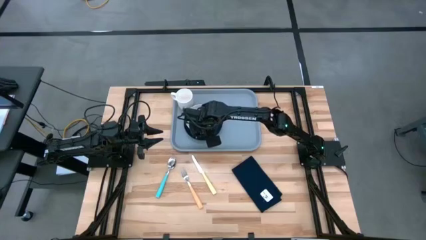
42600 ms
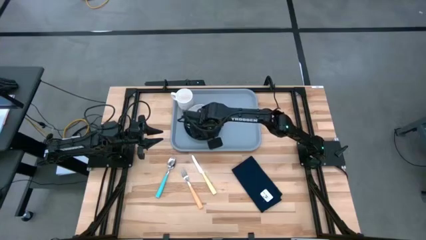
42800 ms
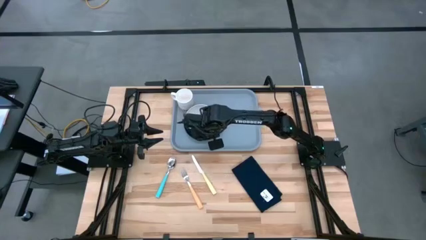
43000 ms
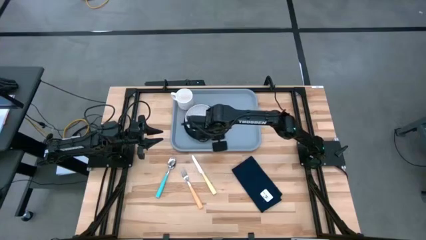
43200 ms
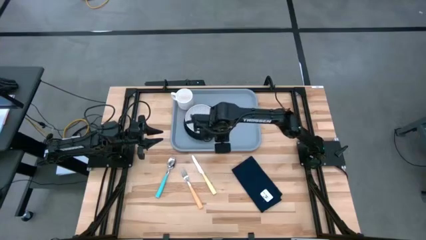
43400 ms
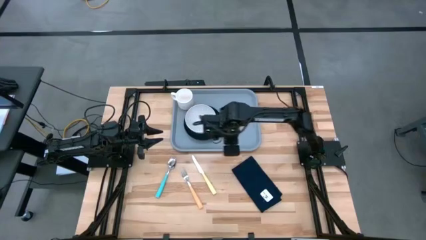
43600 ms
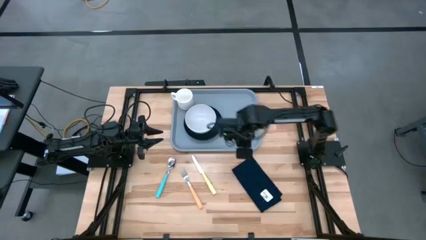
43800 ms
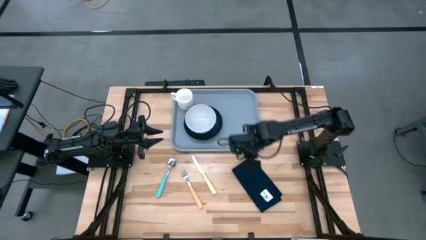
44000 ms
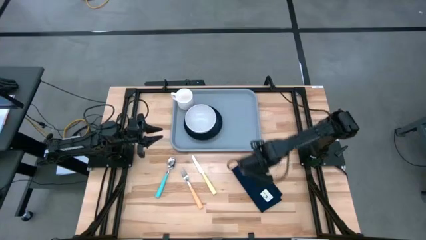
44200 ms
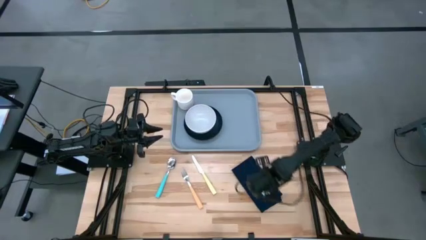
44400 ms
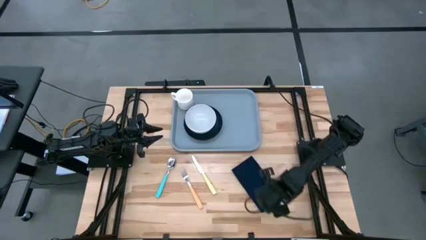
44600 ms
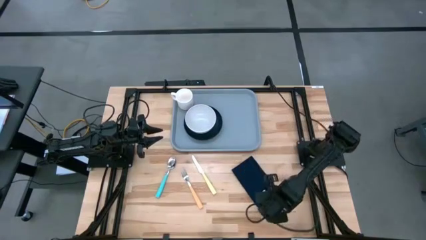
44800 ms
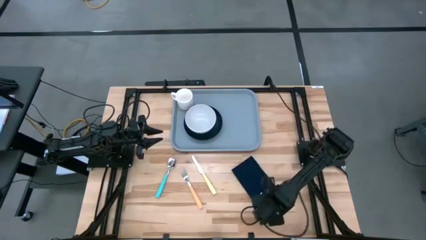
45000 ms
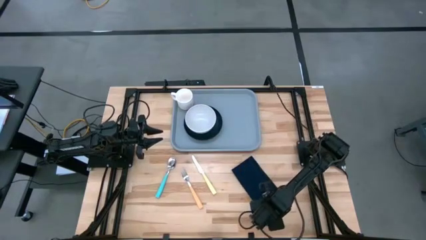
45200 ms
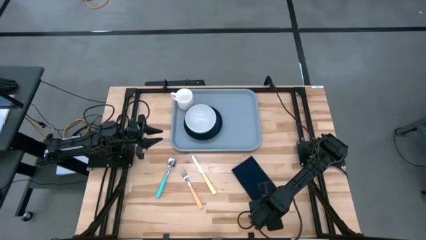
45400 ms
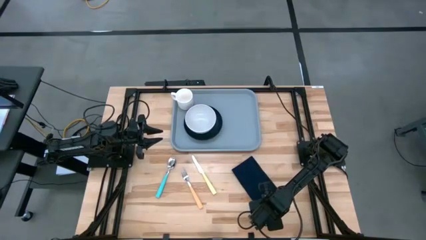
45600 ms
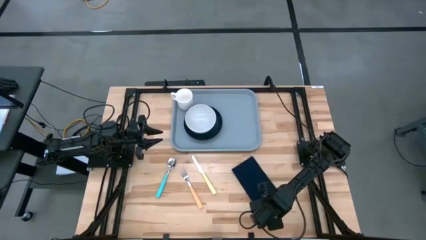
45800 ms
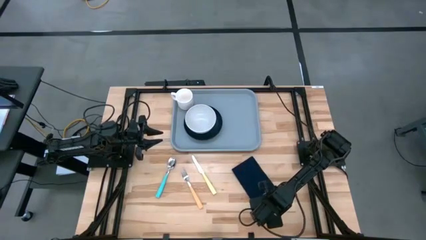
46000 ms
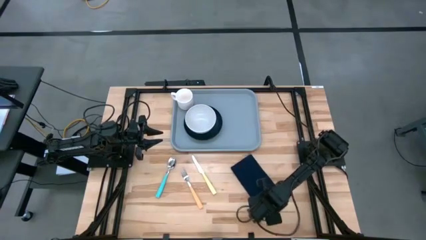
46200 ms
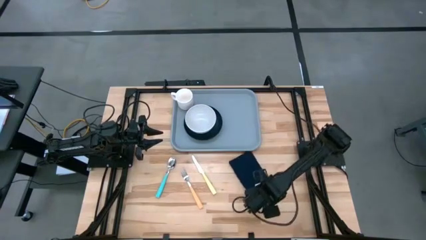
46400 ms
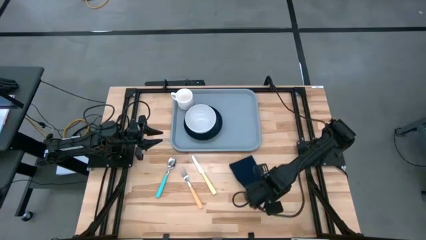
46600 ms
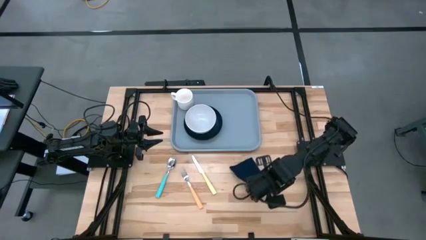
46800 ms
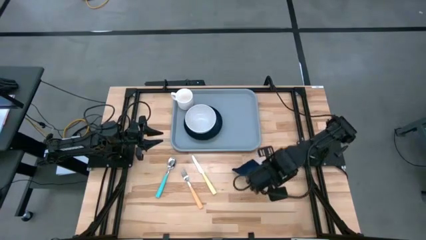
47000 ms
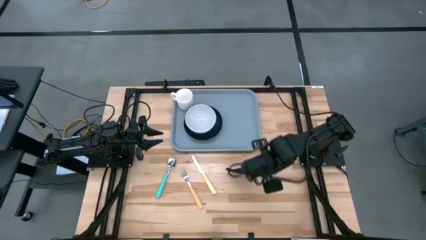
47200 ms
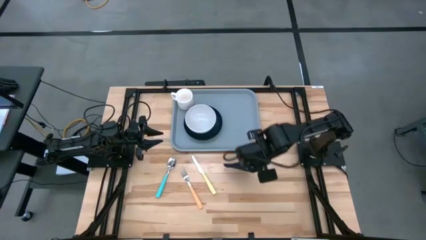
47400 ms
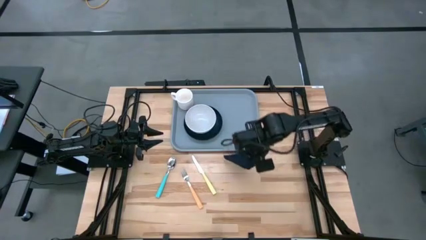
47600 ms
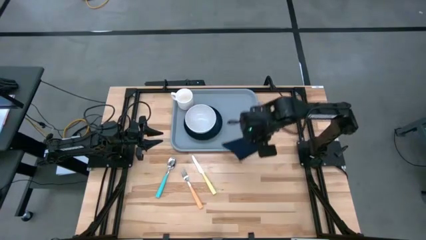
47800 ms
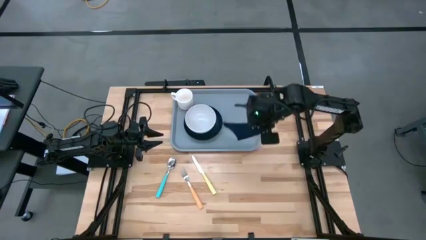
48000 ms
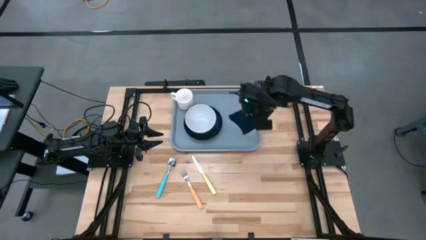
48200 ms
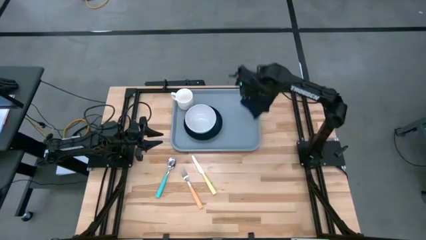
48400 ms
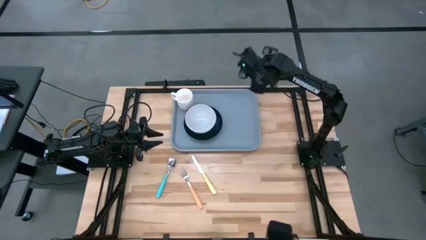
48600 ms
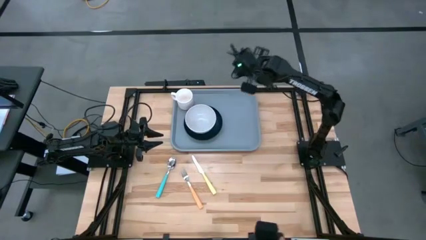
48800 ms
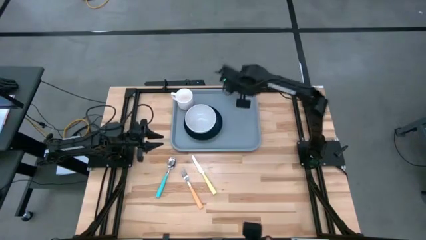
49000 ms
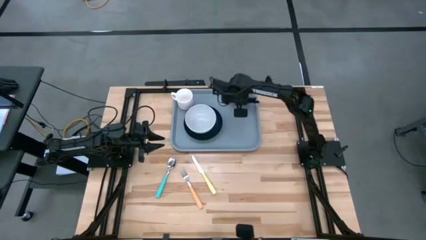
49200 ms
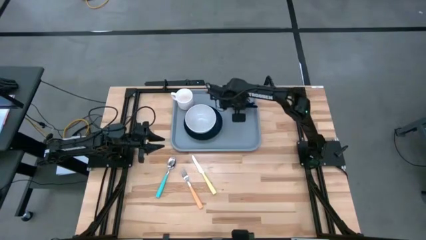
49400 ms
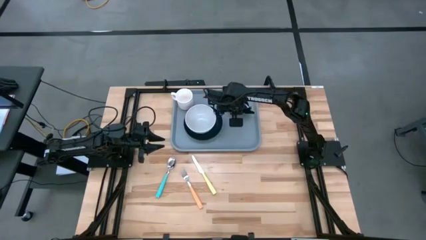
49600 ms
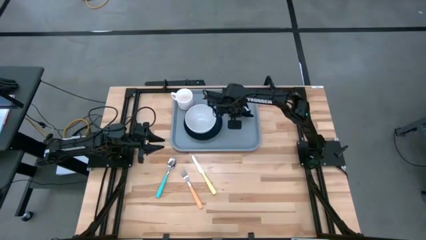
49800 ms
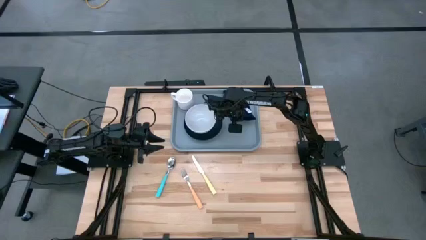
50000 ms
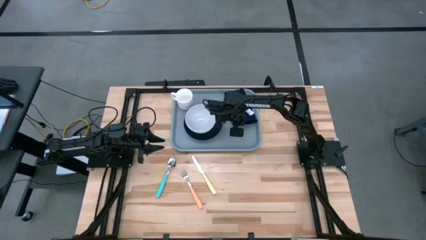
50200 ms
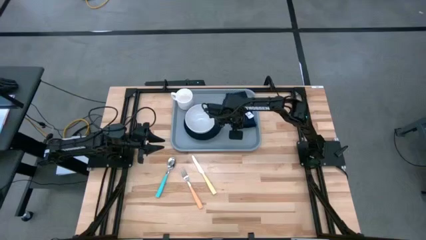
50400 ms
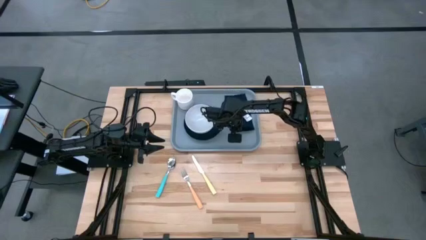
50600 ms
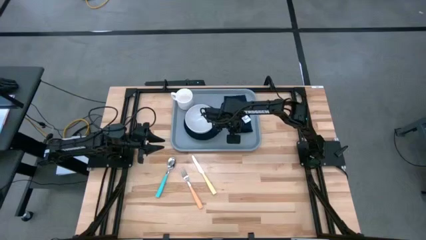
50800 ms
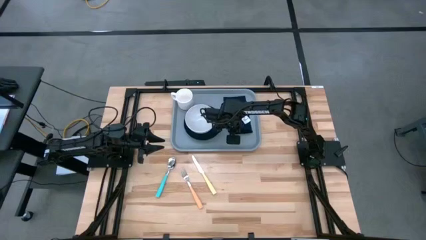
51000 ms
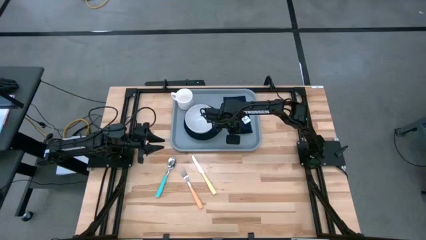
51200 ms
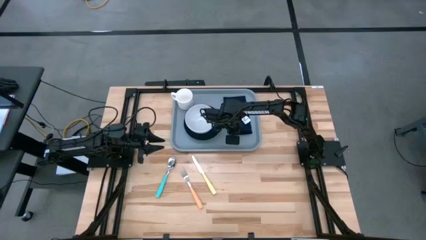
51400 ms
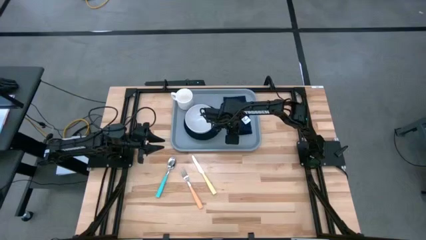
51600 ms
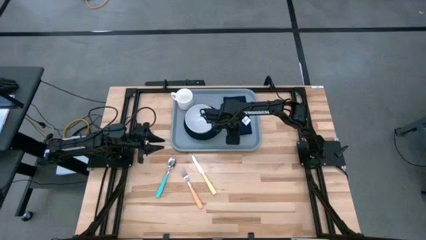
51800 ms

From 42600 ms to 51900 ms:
Task: Set up tray
Put the black napkin to the right of the black plate on the gray serving tray

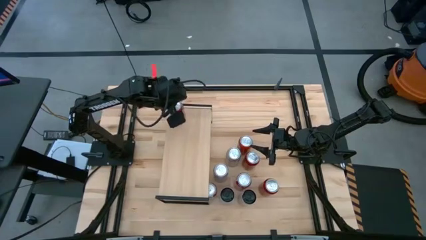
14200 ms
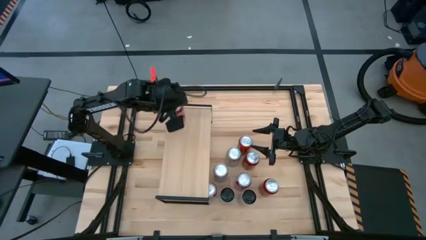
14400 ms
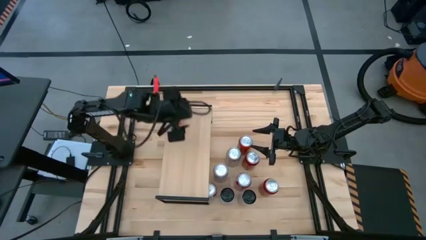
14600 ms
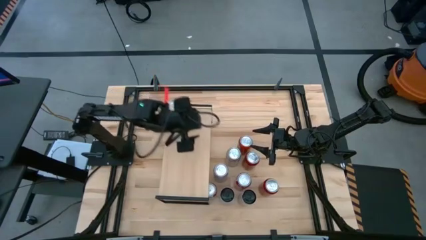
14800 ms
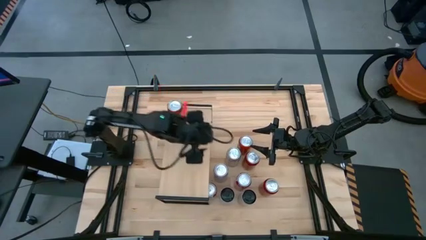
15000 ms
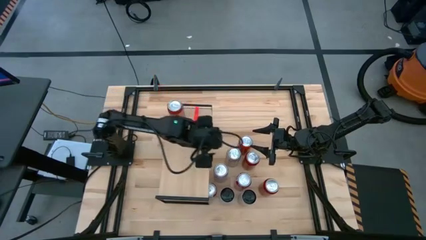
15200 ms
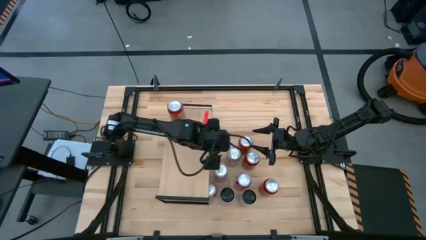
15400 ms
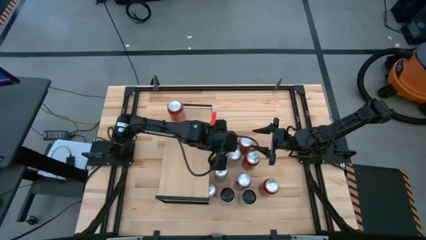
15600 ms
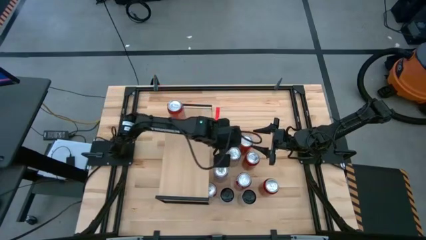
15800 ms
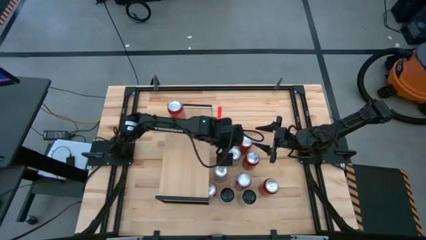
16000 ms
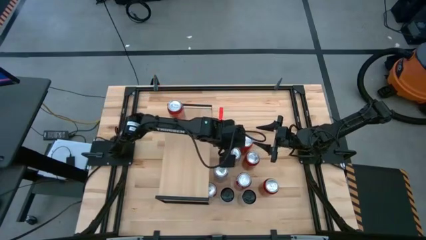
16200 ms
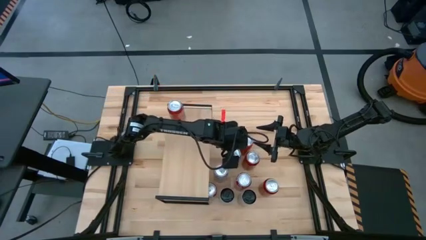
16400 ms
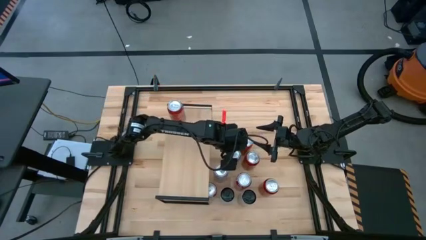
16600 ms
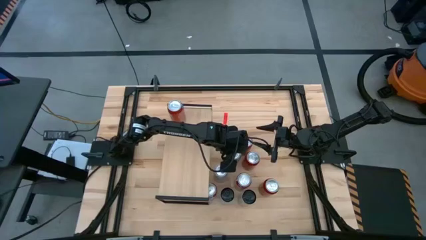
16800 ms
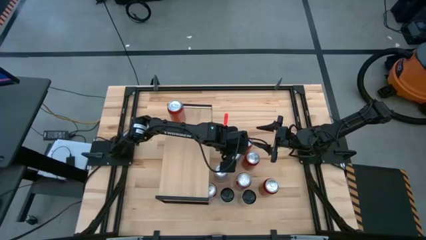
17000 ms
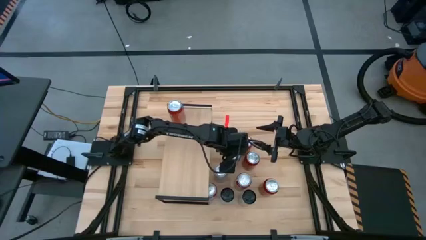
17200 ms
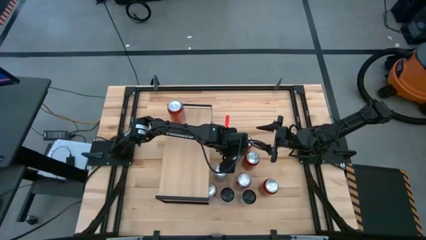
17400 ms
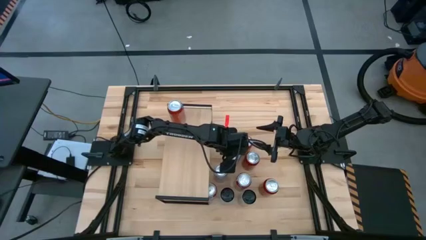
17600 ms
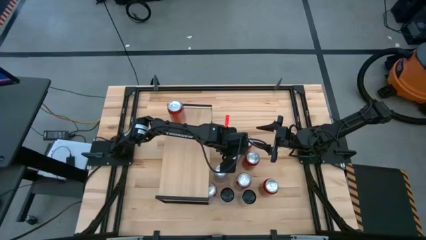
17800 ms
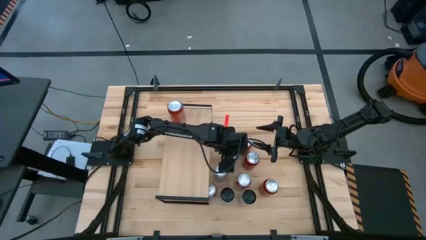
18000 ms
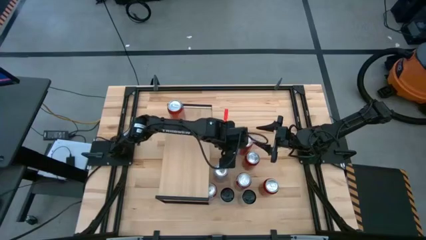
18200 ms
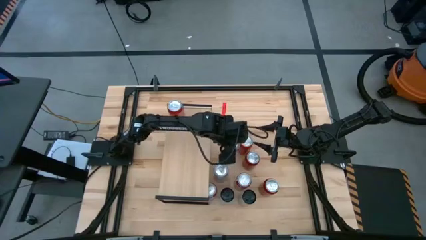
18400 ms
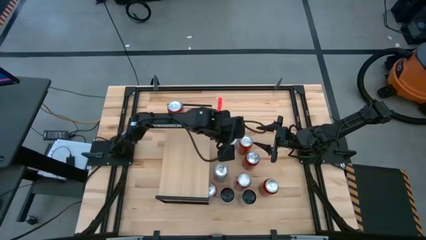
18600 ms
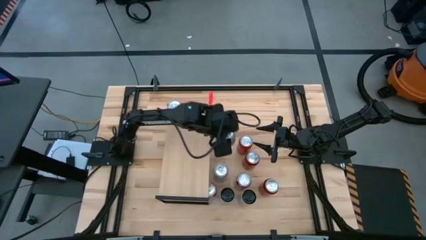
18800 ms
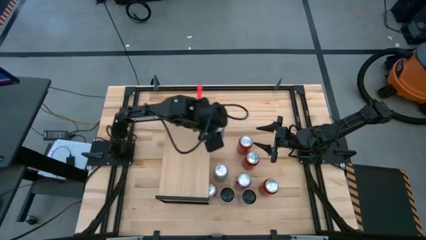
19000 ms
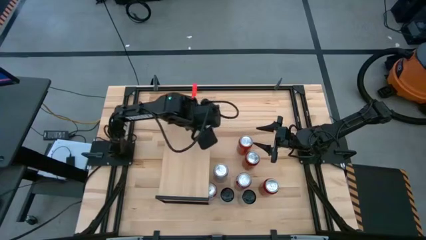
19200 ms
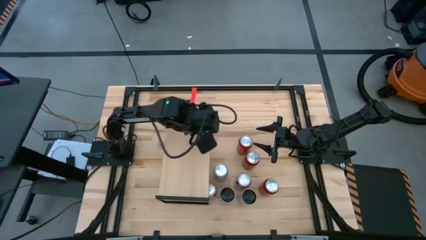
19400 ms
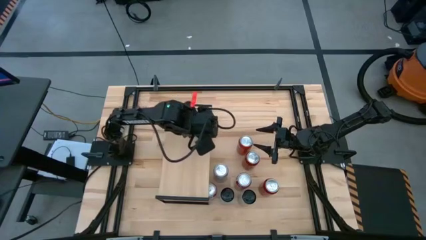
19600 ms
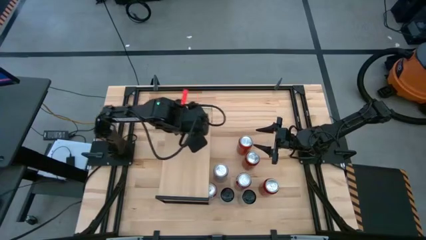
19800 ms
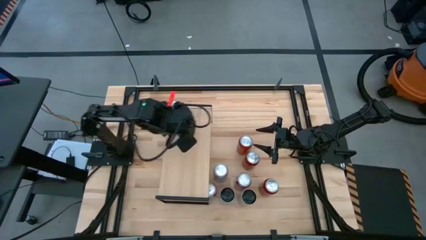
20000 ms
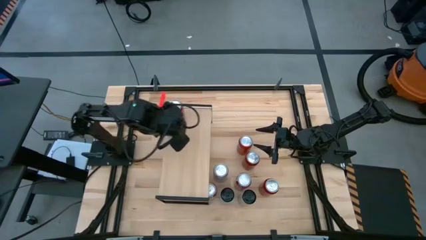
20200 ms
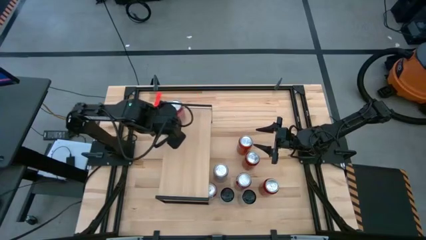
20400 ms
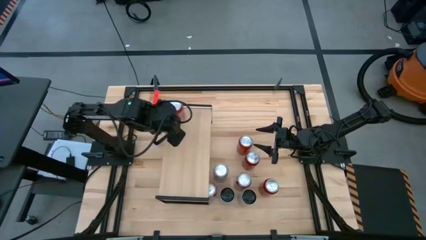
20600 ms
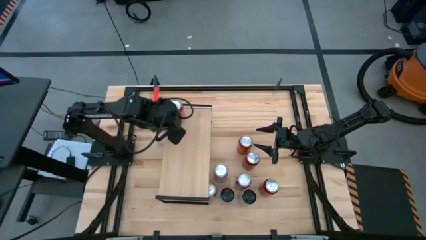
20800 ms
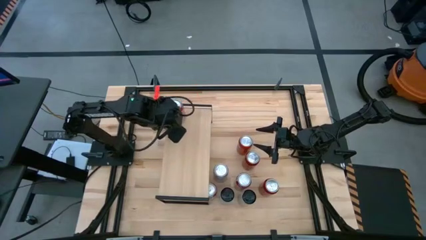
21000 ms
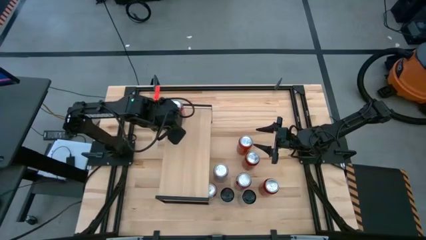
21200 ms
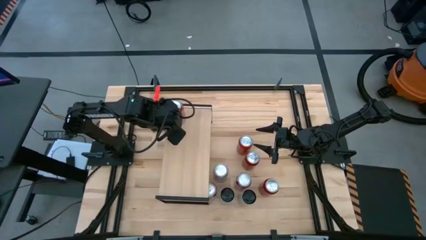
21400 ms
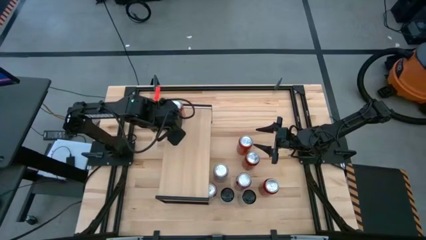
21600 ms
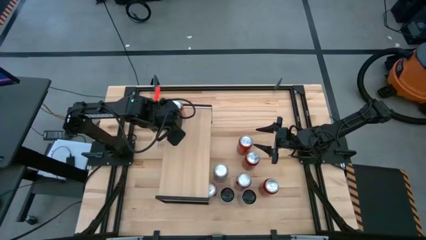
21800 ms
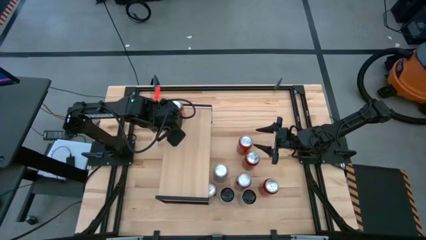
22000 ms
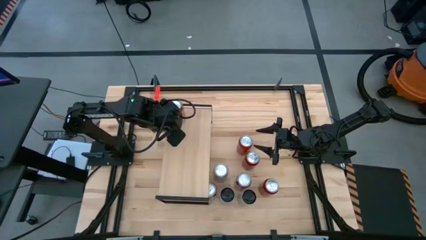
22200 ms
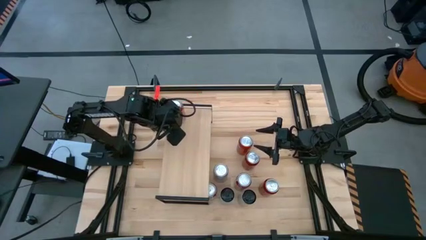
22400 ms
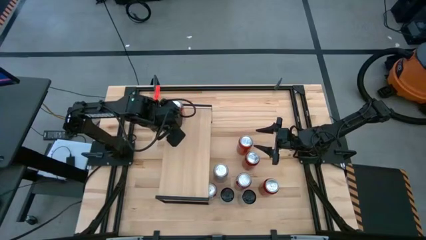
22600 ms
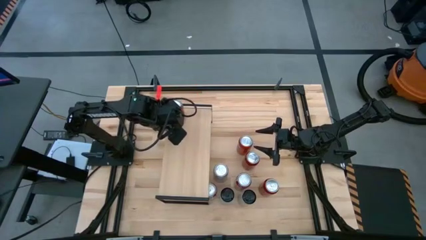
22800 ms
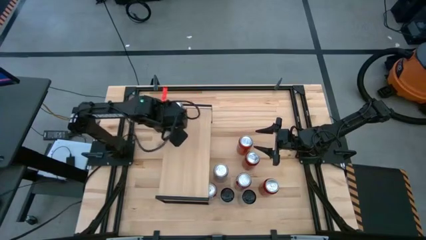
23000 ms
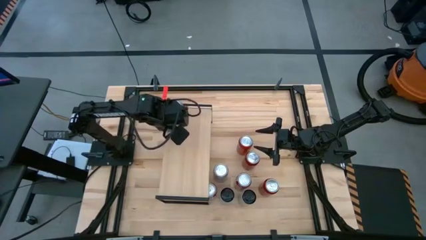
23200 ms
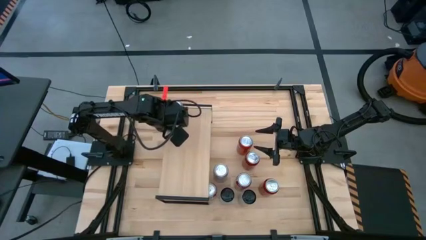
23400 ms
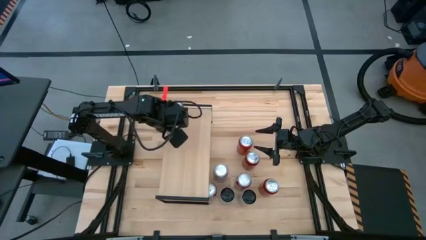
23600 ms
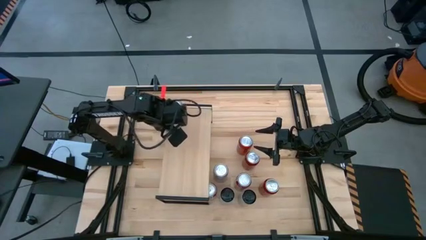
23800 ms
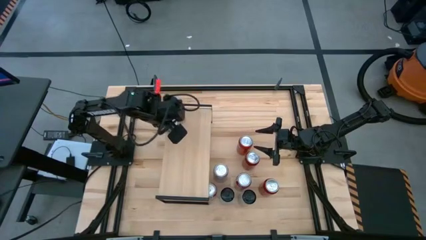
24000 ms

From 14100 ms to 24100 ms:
Task: Place canned beverage on shelf
Put the top silver soda can on the shelf
